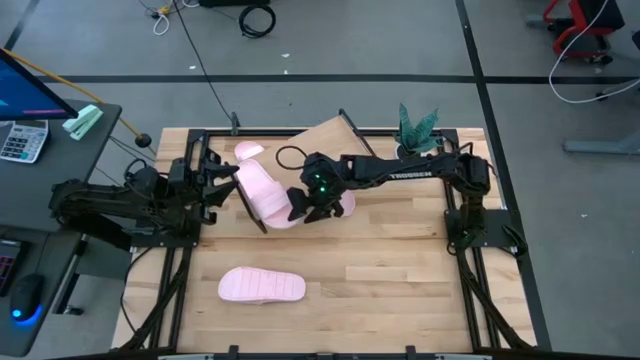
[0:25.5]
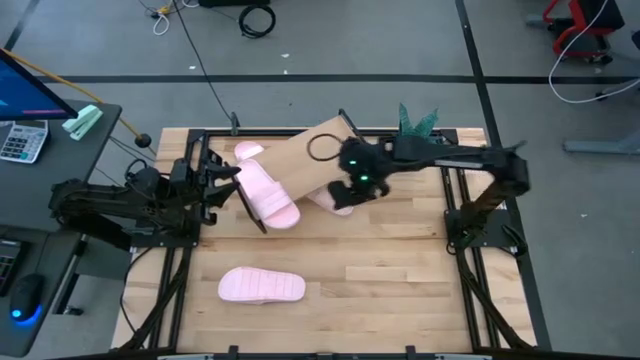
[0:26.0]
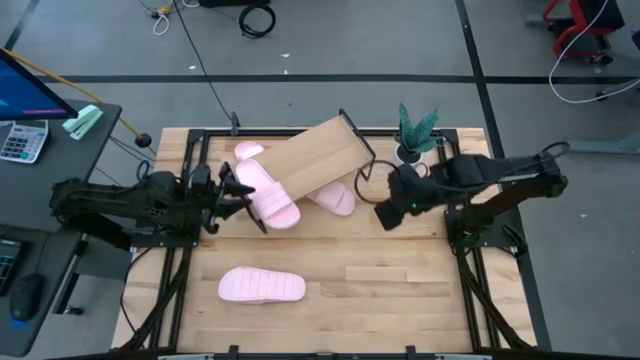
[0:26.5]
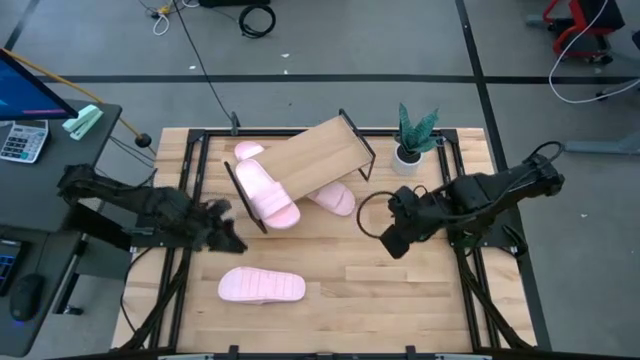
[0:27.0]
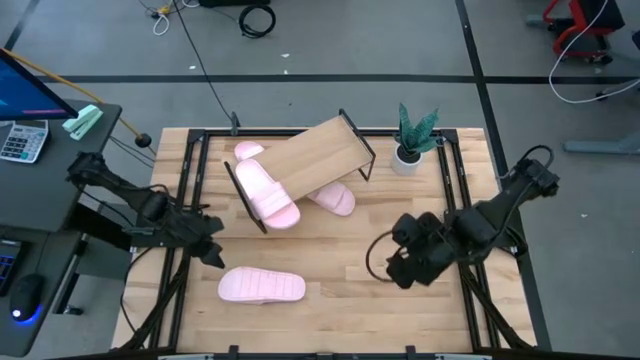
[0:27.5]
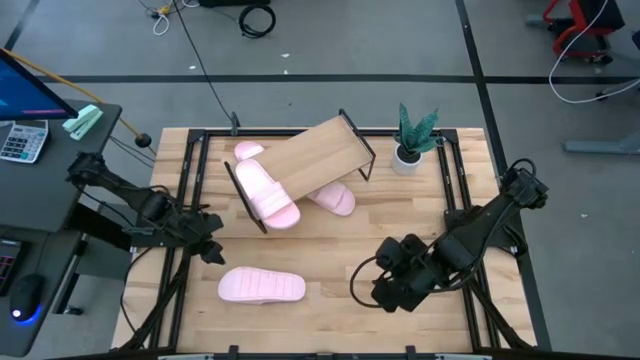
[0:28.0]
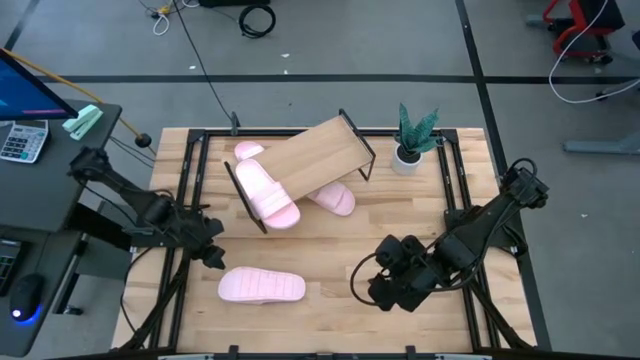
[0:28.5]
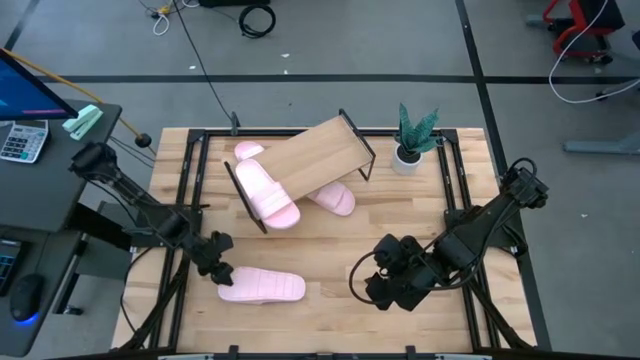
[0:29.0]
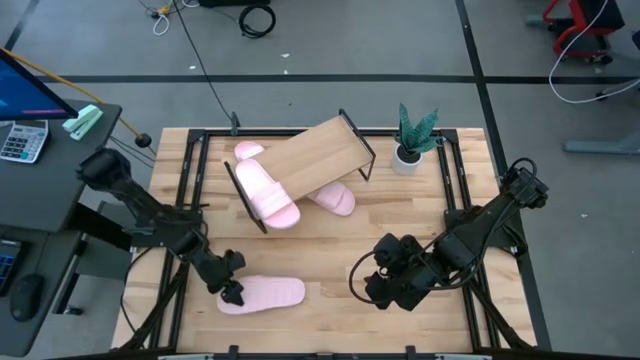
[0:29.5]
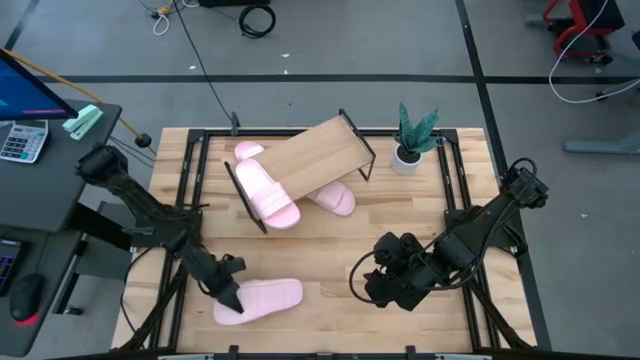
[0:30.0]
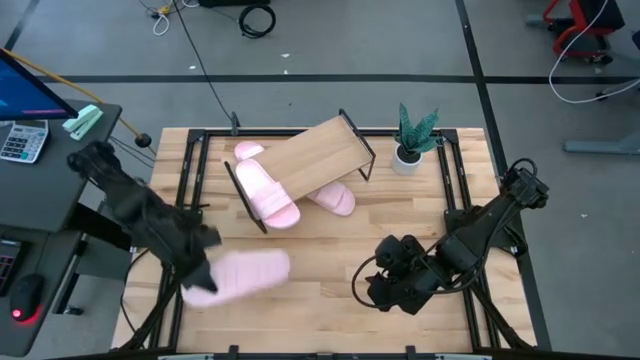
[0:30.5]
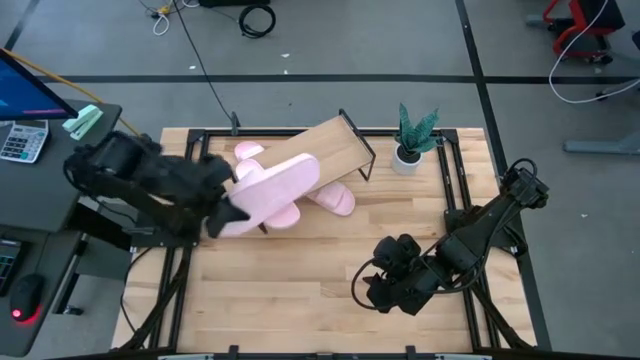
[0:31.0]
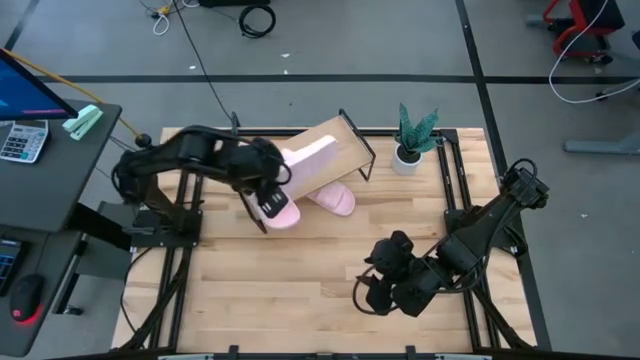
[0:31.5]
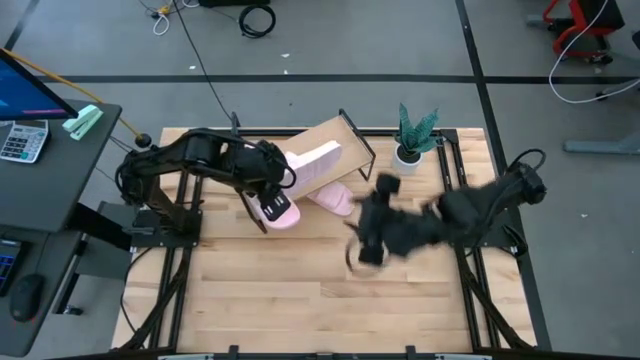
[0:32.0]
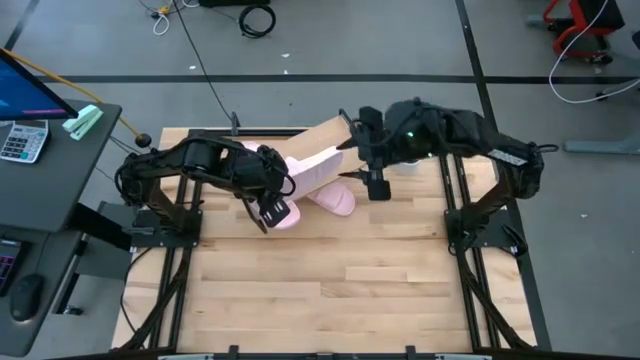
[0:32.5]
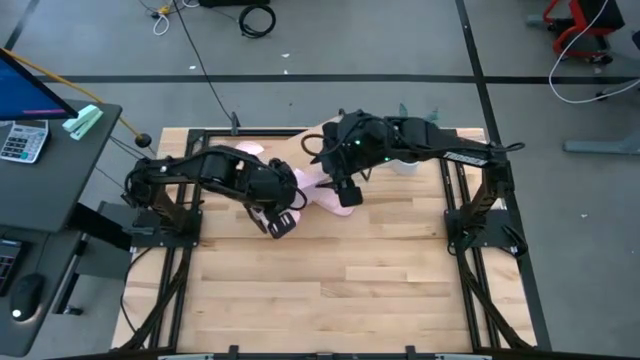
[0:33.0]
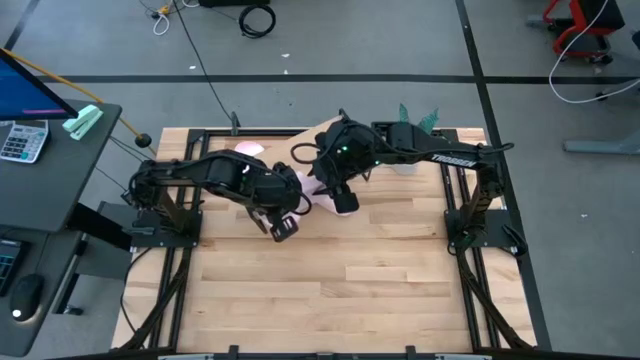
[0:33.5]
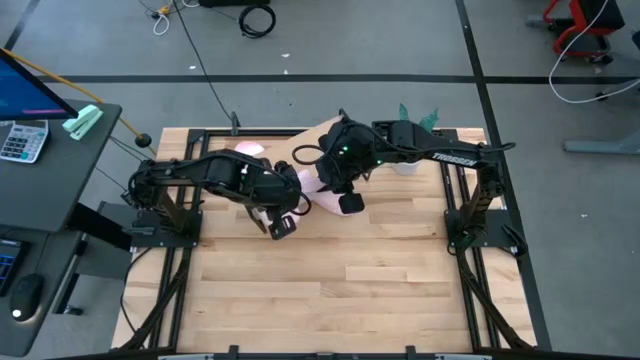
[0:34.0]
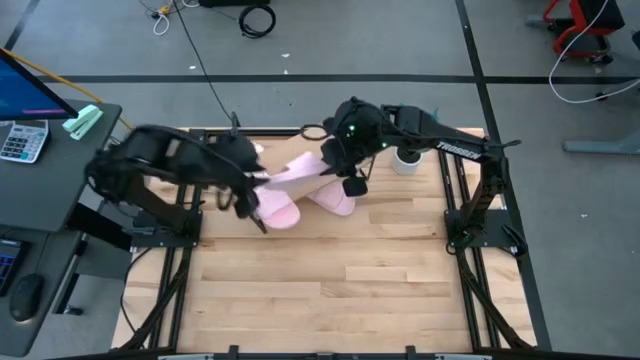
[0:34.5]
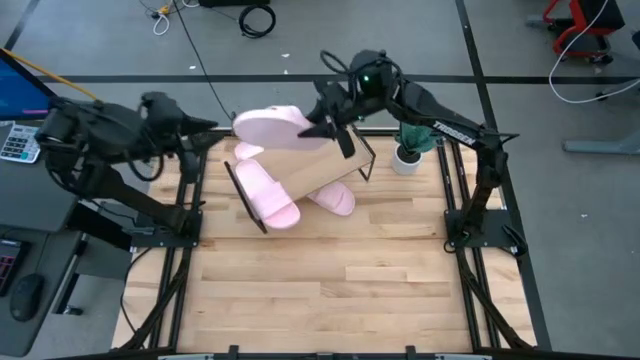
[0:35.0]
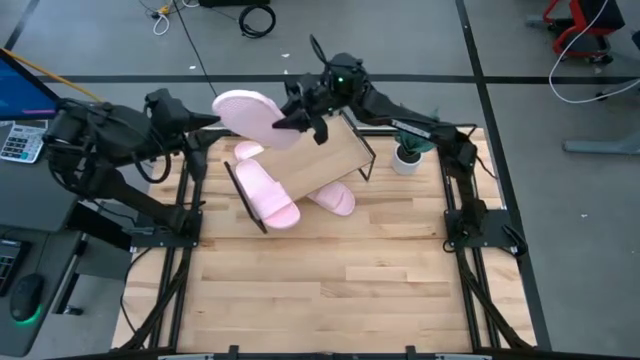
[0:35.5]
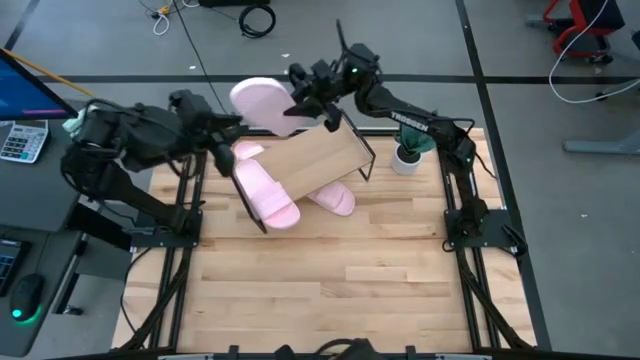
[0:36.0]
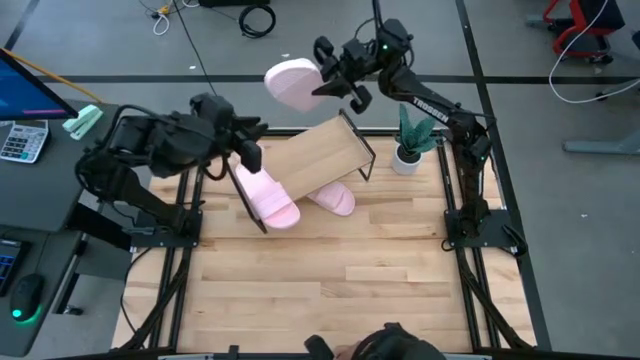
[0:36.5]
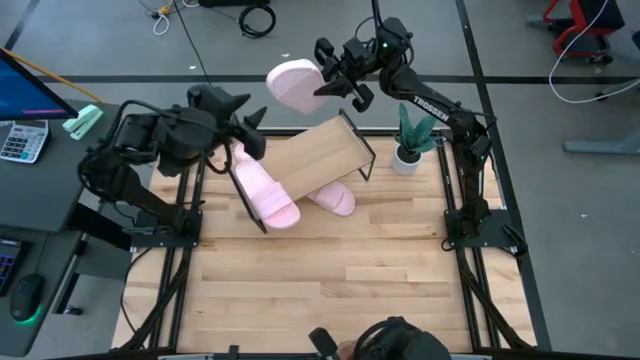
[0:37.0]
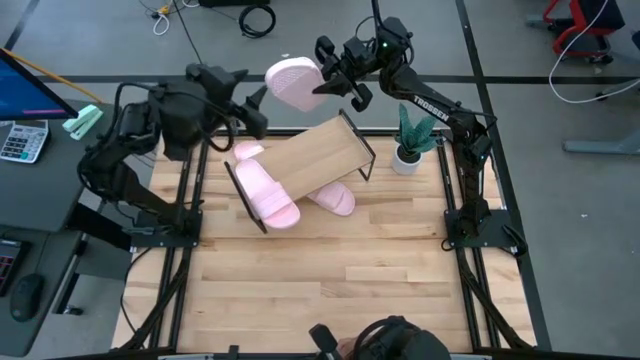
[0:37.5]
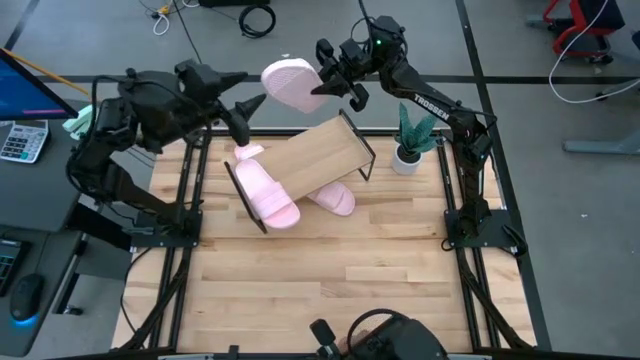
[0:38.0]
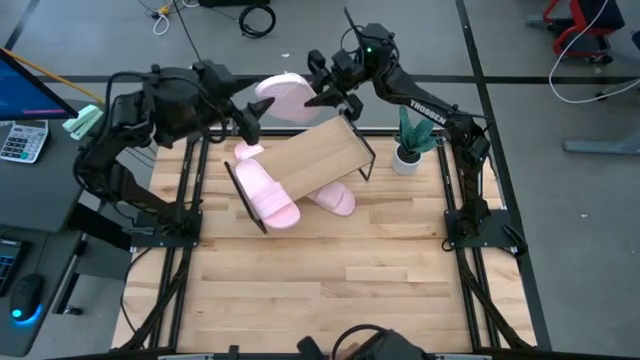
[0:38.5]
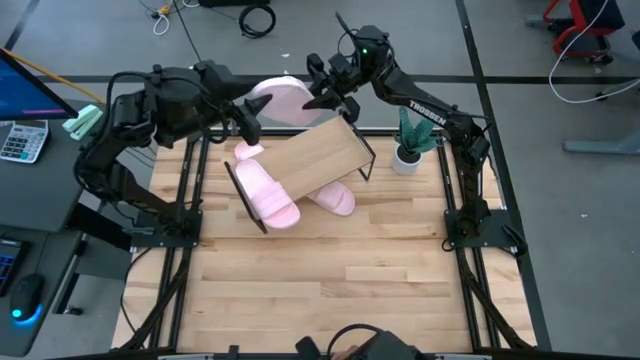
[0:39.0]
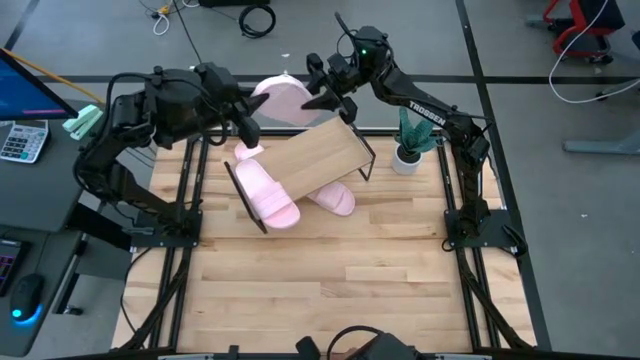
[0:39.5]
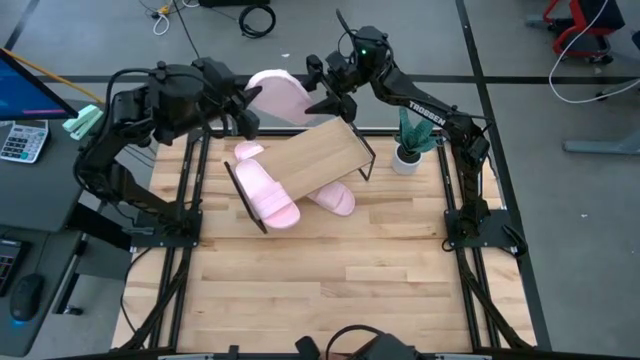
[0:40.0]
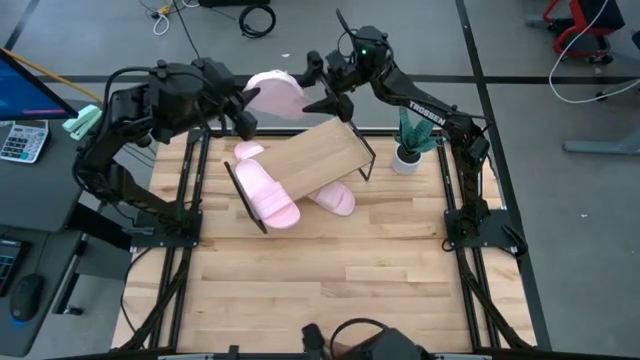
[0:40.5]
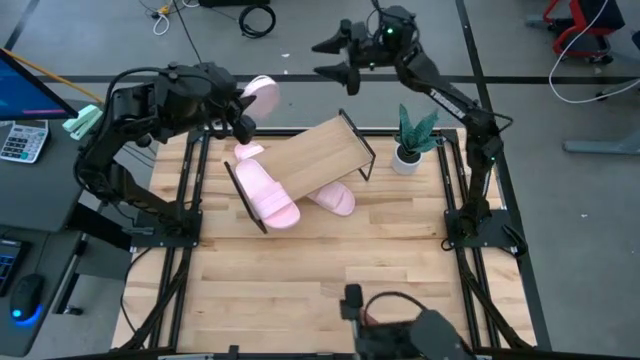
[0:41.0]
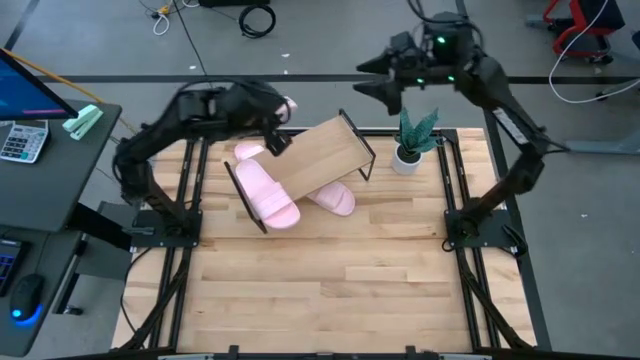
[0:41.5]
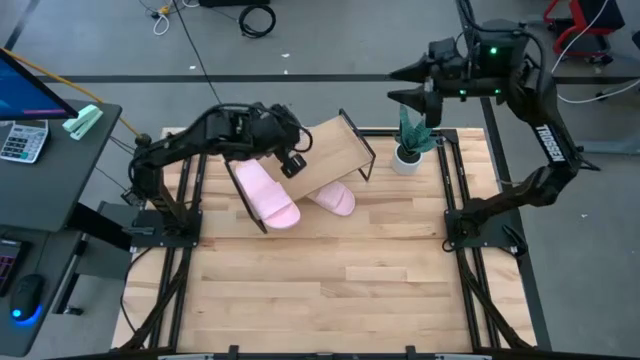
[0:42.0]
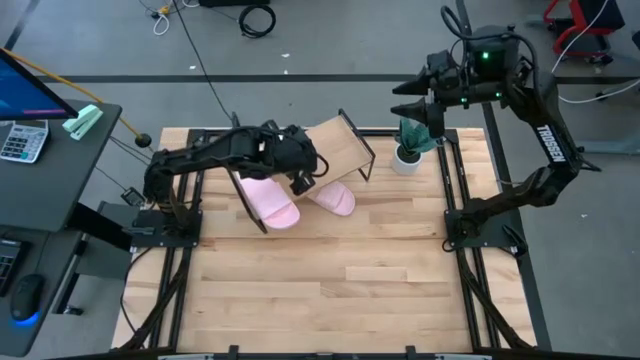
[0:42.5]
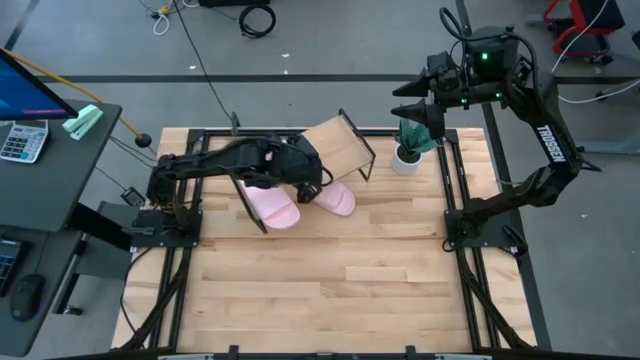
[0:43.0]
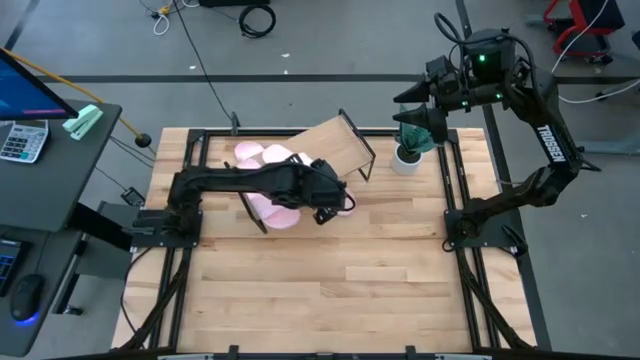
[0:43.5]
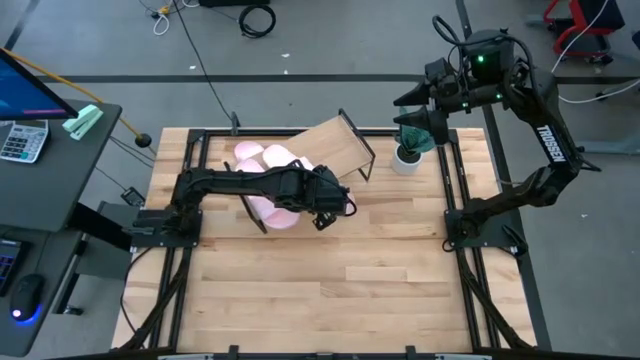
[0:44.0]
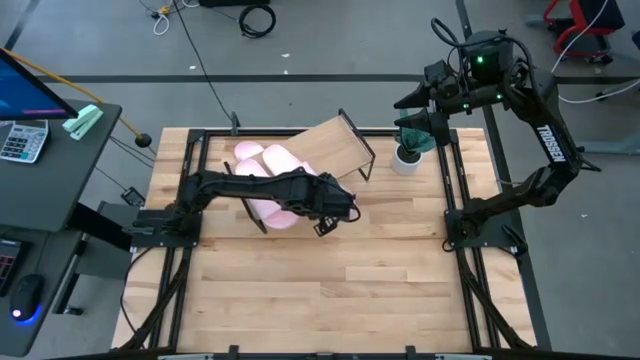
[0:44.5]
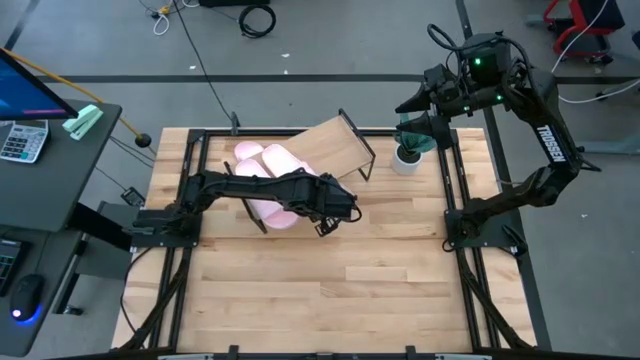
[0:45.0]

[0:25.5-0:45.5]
Task: Pick and place slides into the shelf
Put the pink slipper on the shelf

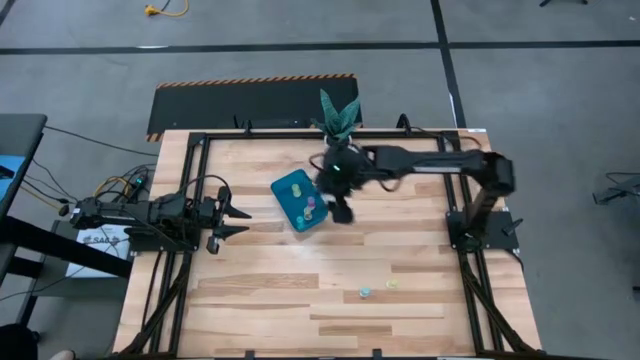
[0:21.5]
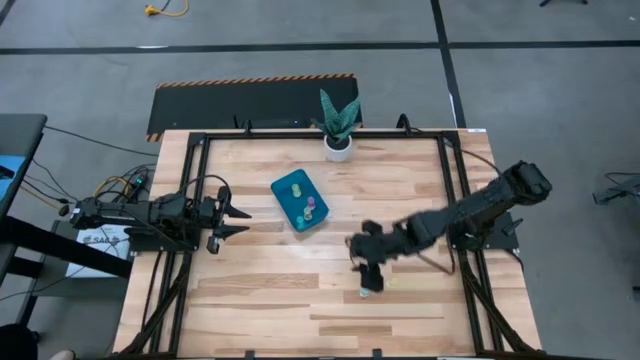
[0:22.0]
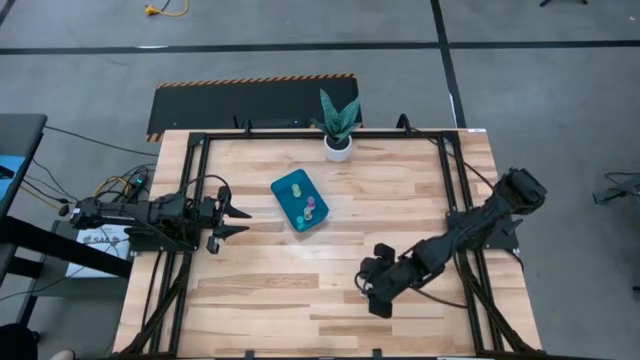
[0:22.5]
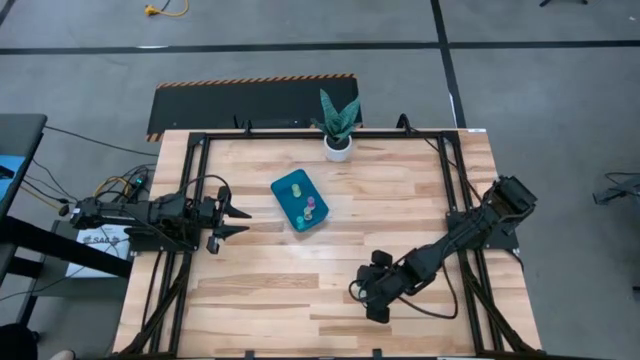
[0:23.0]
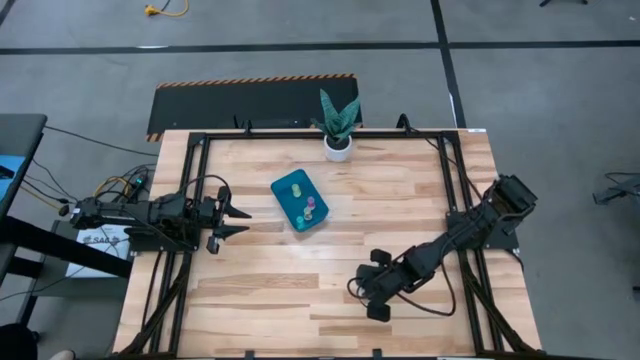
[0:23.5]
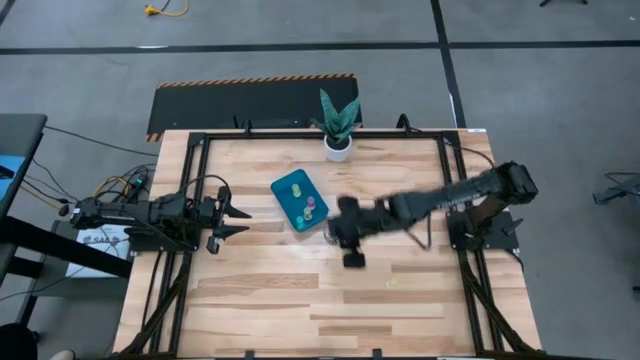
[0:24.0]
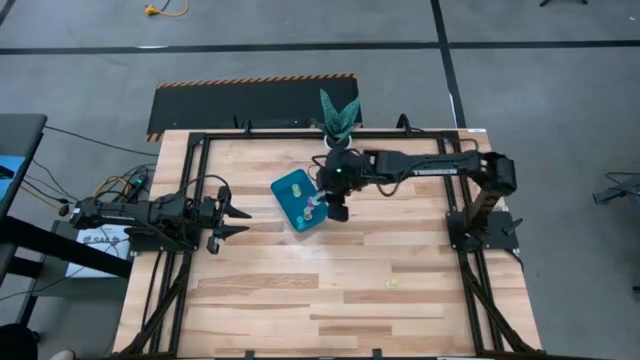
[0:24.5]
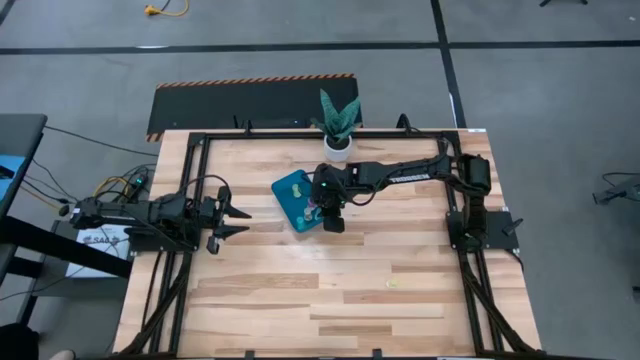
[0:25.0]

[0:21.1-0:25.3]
Task: Pick and place pill bottles into a basket
Put the blue medicine bottle into the blue bin
